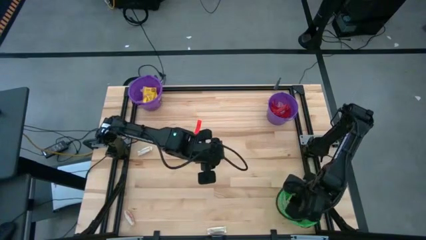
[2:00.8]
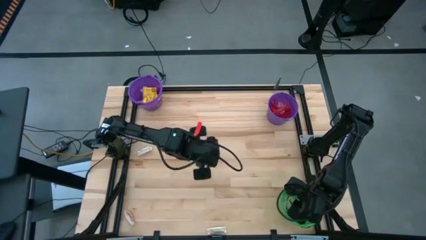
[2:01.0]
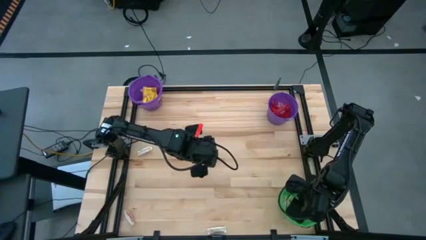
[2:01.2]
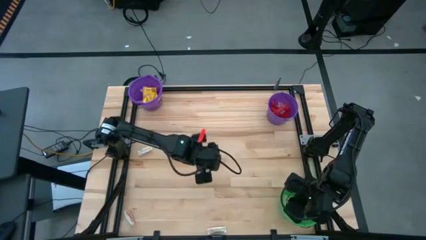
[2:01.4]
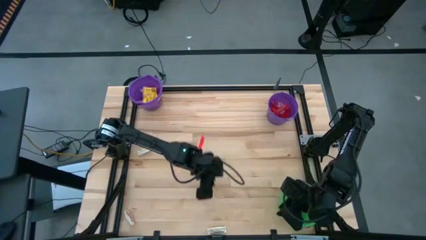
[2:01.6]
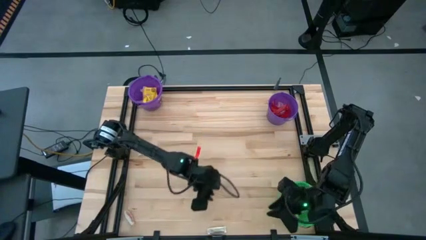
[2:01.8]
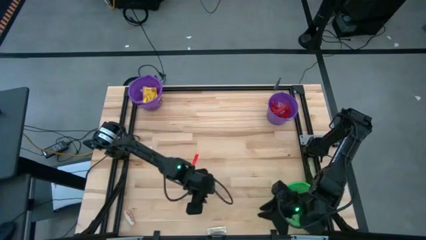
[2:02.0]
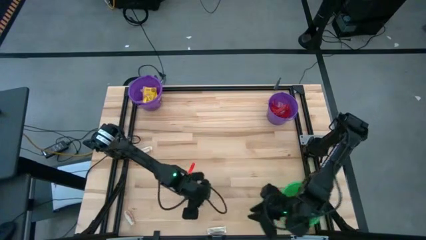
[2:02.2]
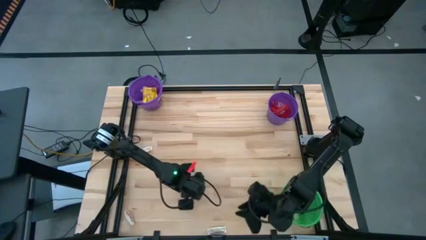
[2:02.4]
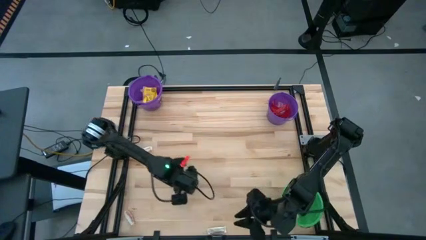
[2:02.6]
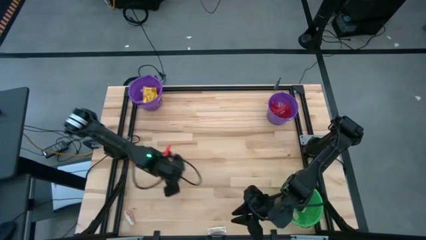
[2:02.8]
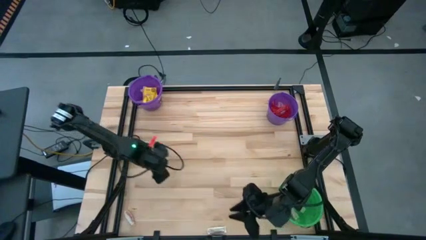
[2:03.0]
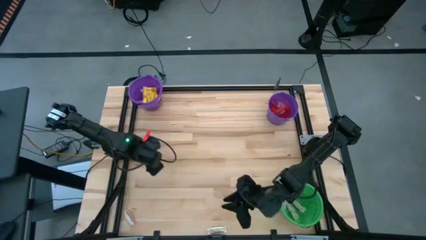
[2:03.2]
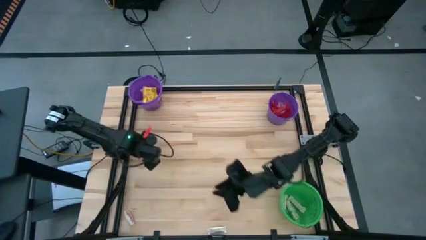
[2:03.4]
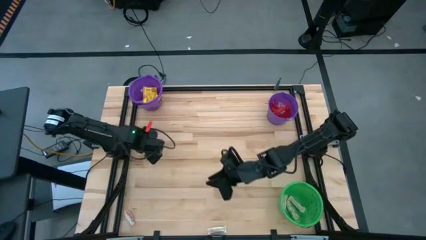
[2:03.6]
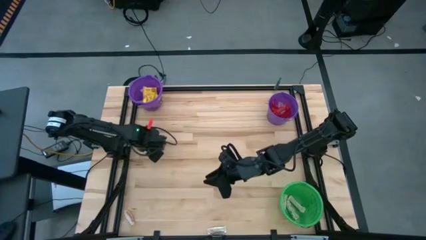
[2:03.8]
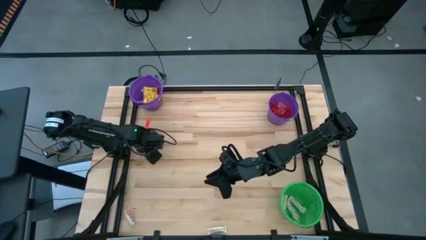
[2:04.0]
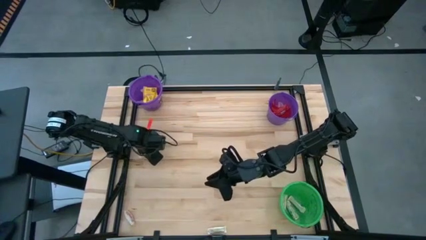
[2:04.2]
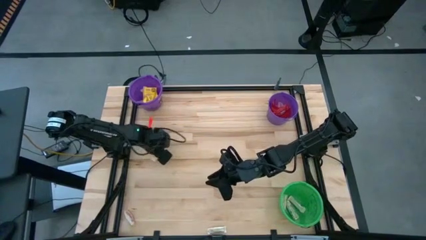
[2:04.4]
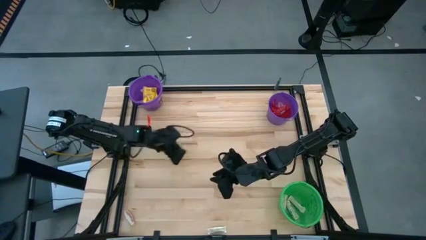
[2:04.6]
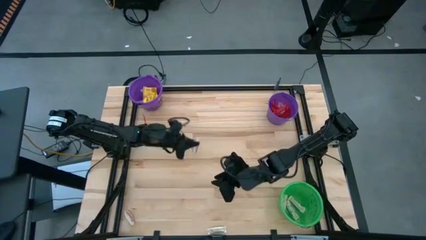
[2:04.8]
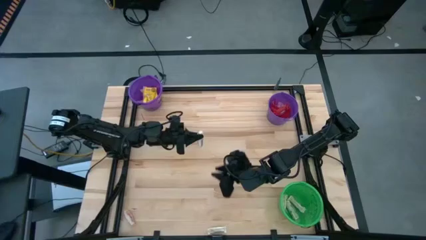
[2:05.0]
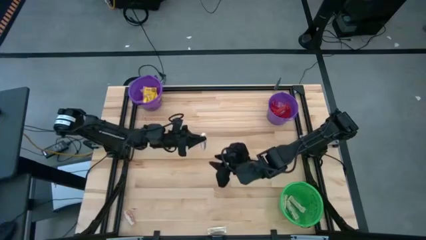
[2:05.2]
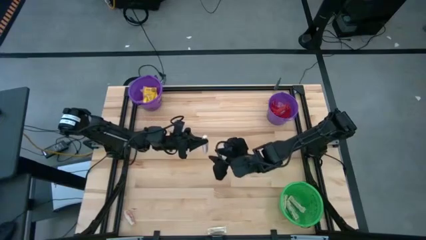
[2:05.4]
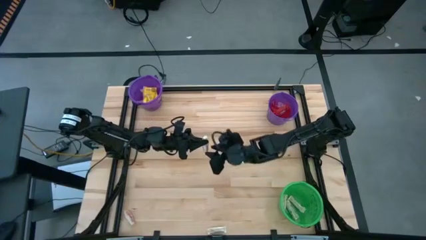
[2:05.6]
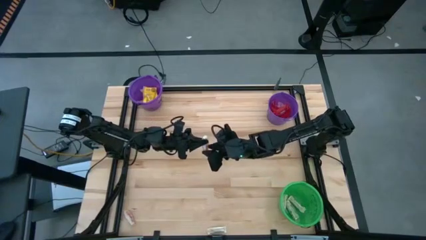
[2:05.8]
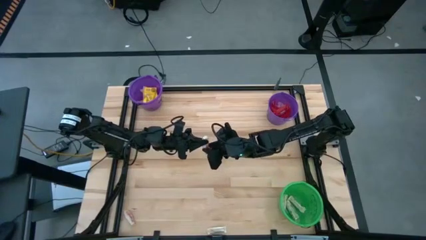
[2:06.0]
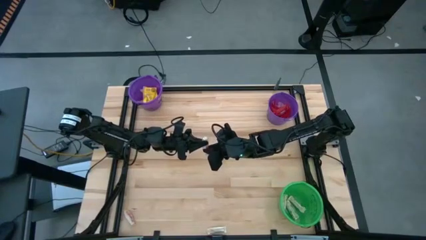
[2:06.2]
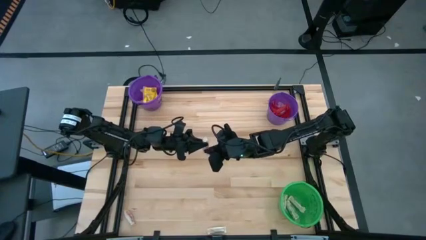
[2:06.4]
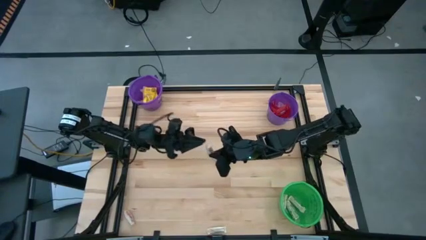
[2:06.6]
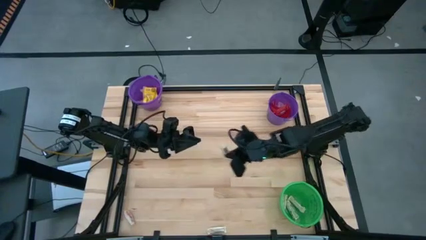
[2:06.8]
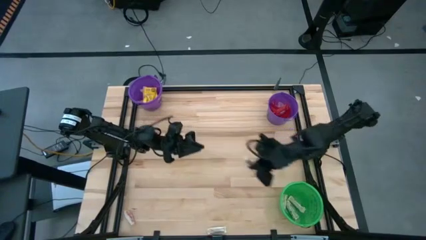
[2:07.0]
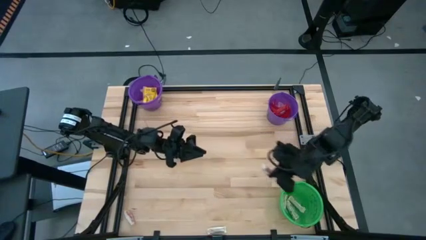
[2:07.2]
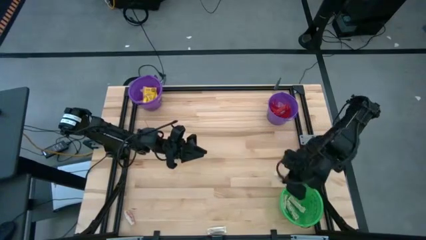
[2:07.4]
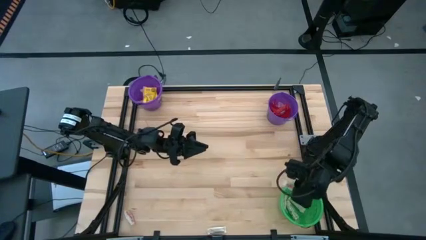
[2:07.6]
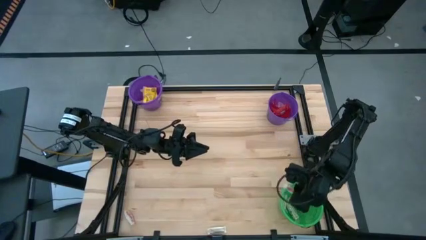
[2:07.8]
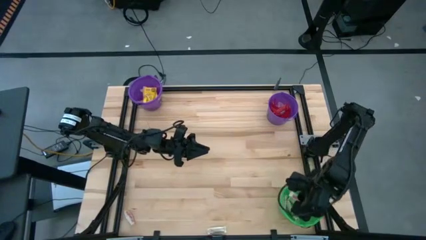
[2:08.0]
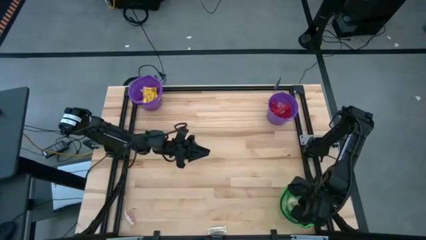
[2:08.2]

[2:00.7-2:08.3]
Task: Sort candy by brand, put in halloween buckets
Put the white chocolate bar into the green bucket

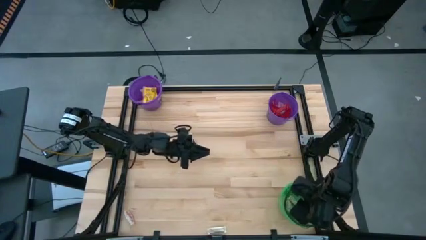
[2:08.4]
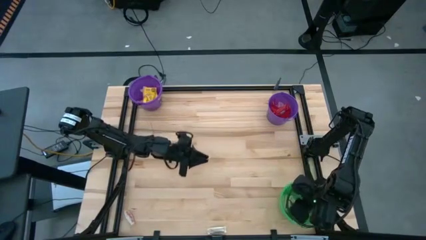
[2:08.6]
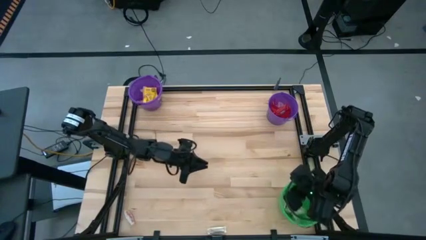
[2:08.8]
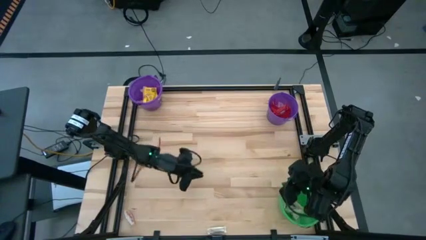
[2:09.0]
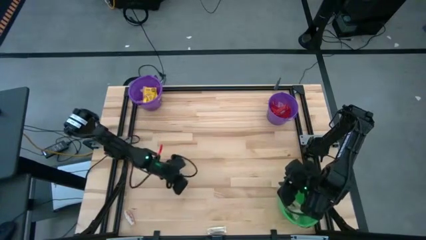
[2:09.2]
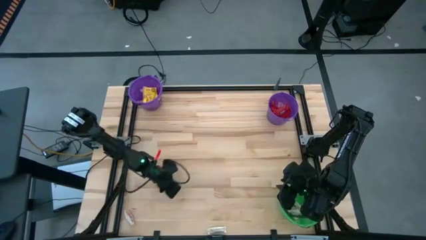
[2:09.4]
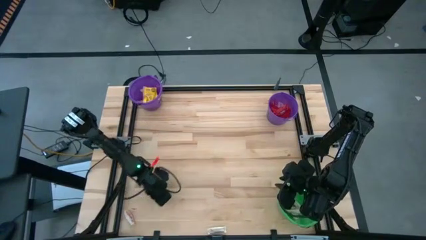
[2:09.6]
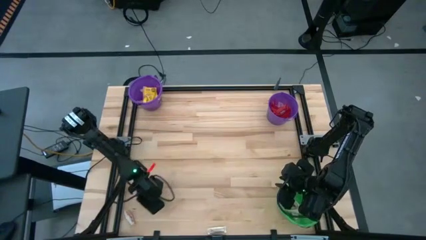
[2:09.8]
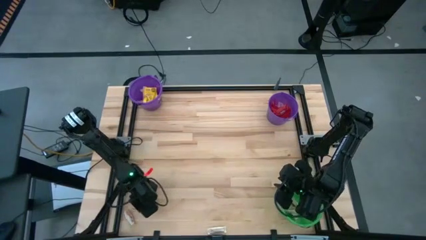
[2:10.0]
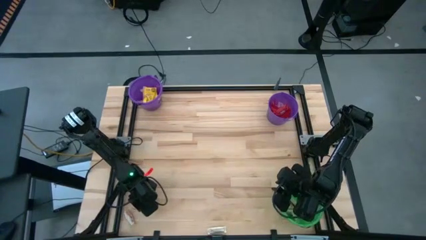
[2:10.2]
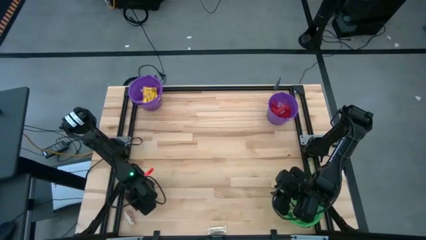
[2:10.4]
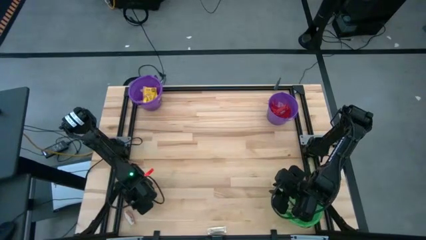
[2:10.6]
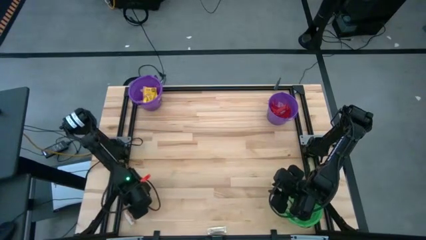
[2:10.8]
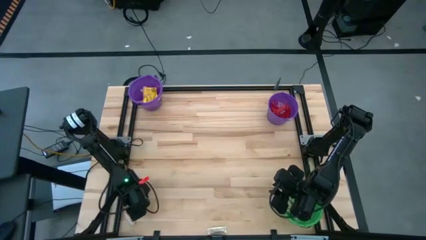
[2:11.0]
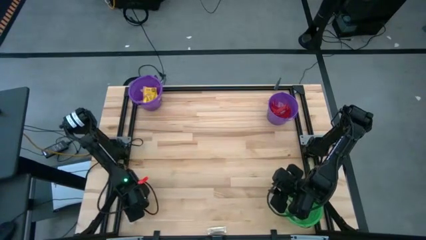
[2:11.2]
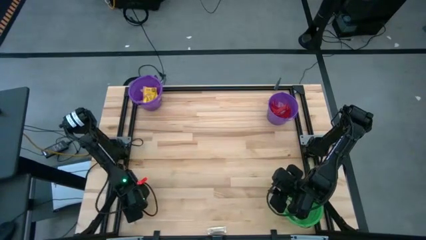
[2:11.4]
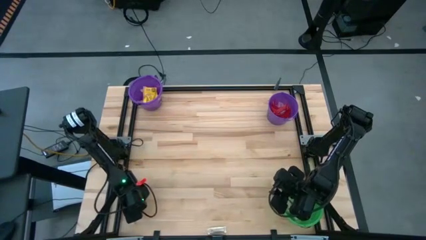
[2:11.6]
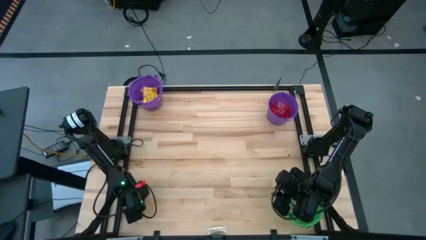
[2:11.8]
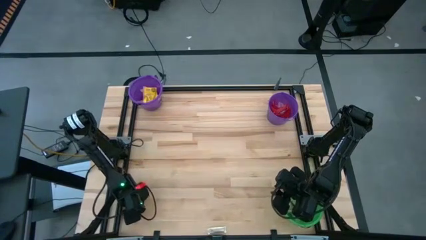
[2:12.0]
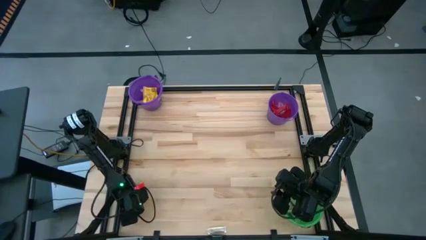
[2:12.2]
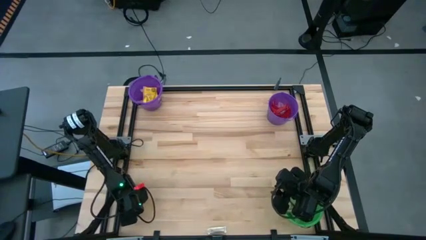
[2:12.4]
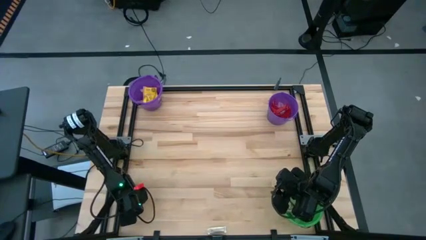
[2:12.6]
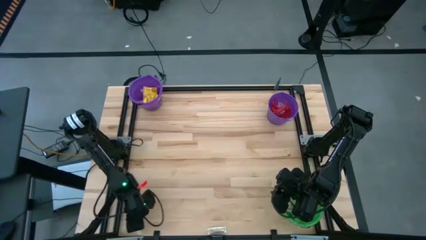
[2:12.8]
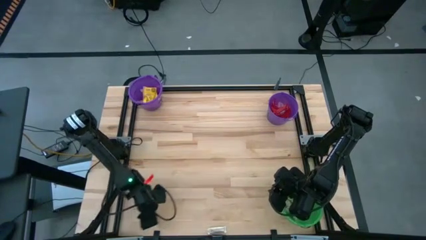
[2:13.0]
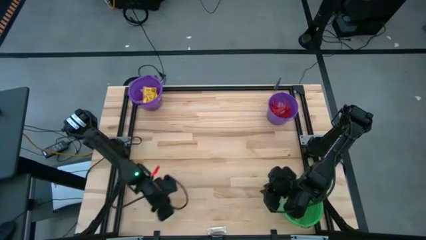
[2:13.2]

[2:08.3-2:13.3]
Put the white chocolate bar into the green bucket

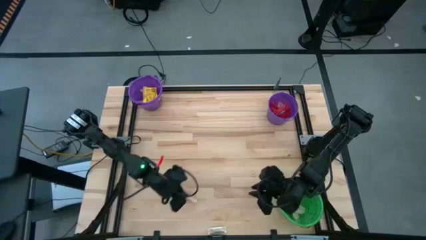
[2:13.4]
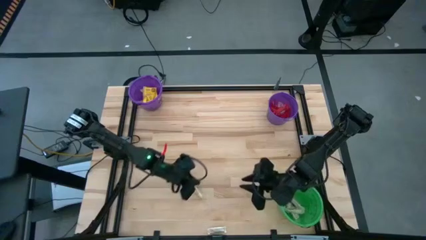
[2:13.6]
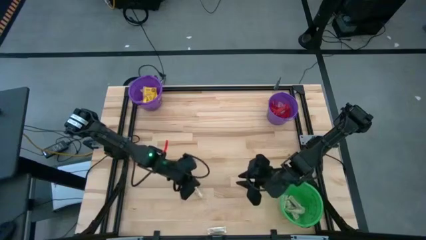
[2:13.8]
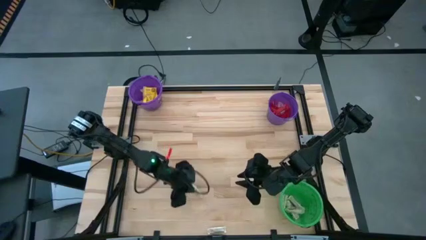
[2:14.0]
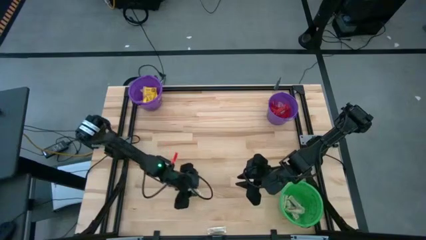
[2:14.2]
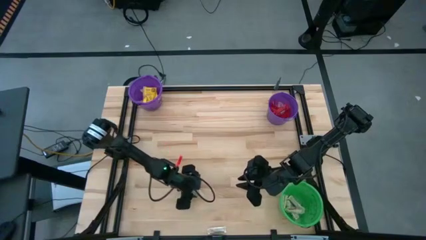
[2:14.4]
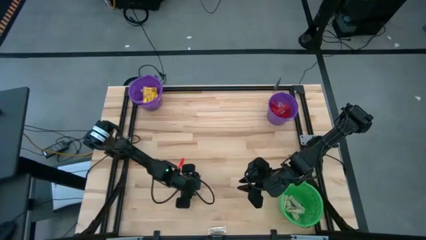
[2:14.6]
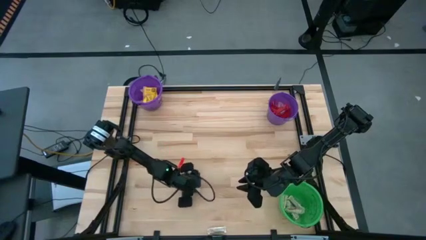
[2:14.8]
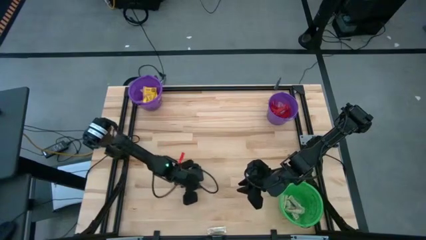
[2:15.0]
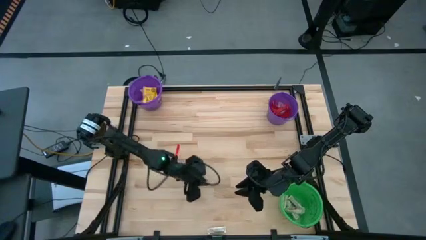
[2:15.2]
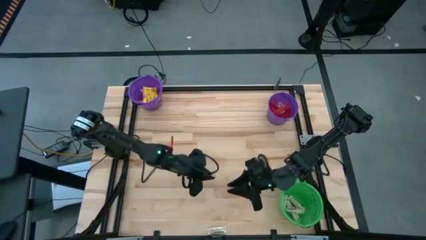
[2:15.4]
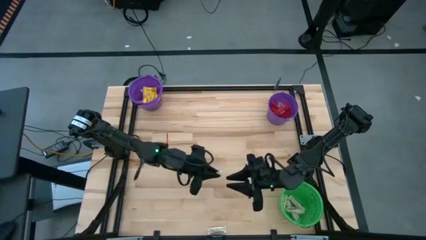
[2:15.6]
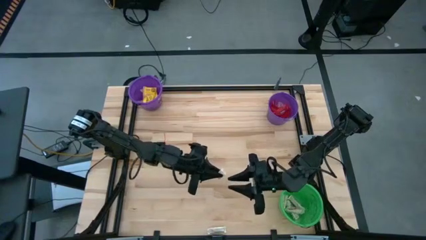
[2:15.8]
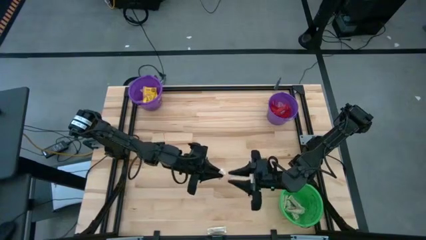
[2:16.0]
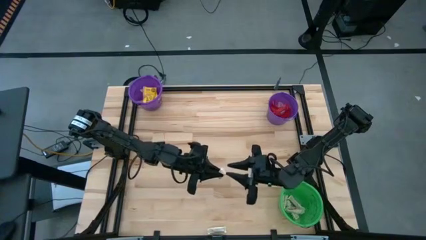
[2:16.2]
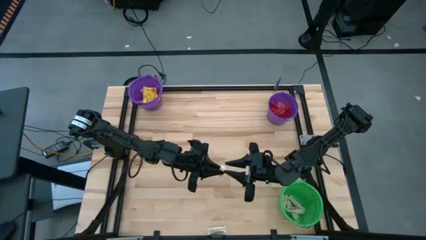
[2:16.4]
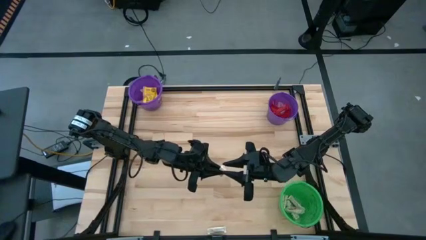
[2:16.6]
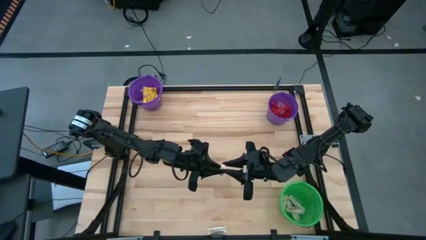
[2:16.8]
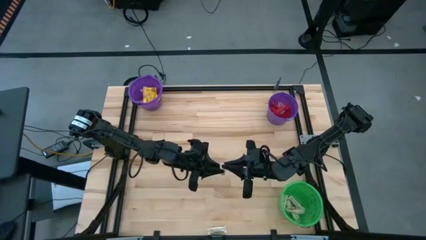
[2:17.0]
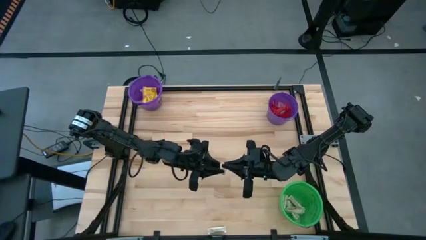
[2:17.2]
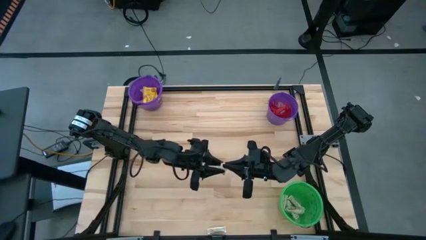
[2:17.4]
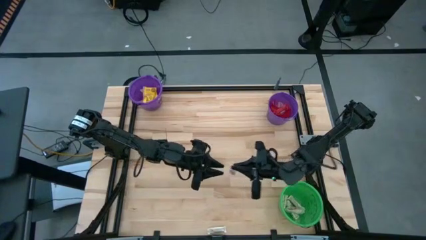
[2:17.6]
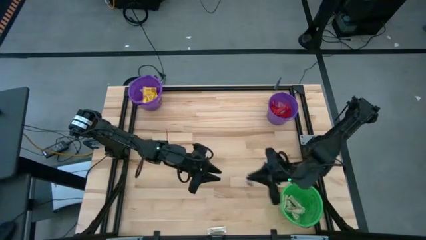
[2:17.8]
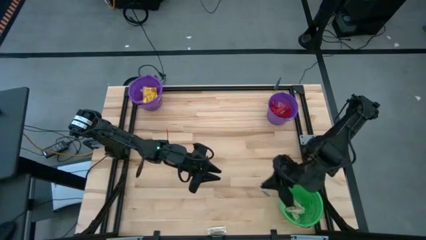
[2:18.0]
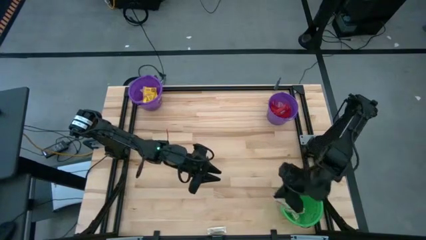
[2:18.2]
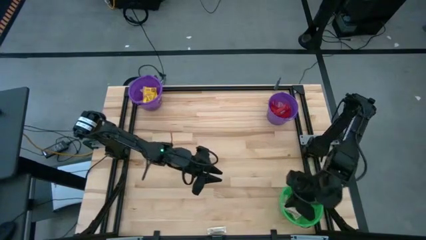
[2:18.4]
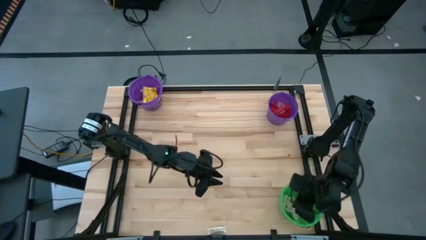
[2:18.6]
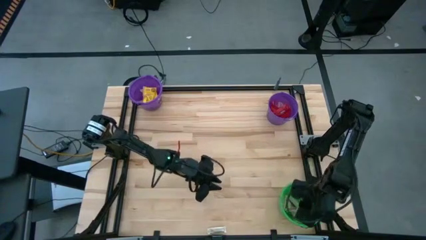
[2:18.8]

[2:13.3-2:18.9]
Put the white chocolate bar into the green bucket
